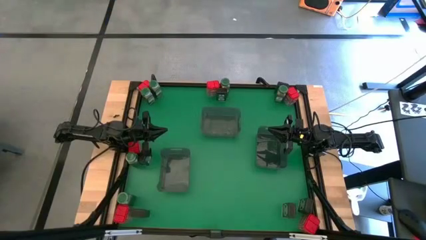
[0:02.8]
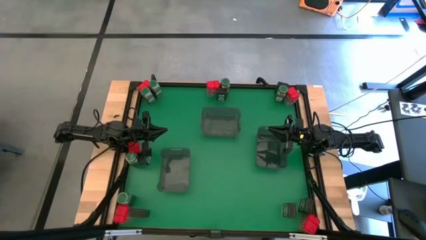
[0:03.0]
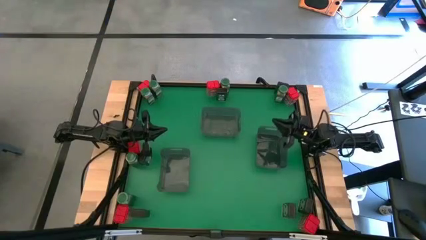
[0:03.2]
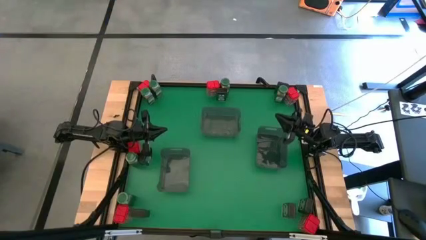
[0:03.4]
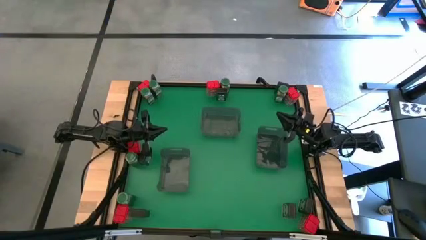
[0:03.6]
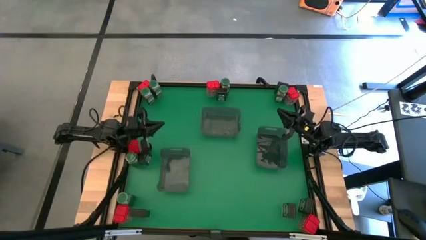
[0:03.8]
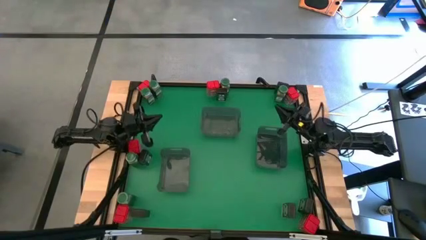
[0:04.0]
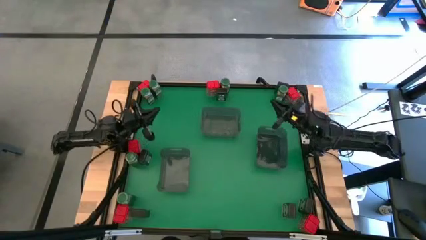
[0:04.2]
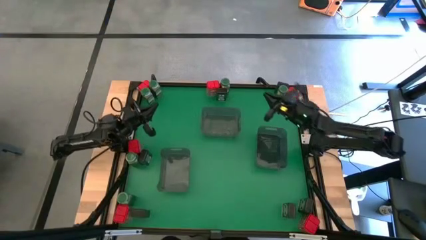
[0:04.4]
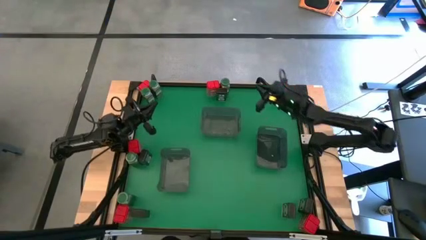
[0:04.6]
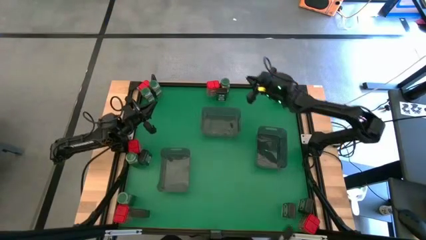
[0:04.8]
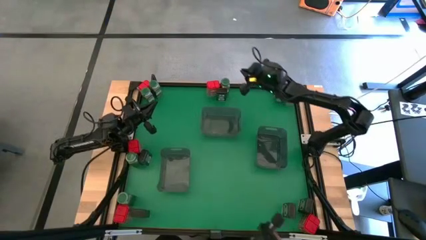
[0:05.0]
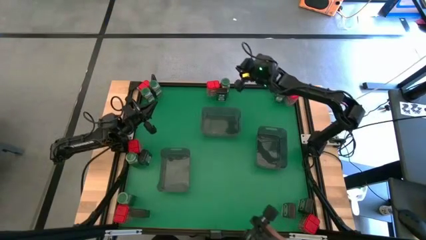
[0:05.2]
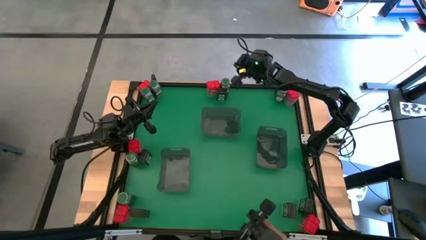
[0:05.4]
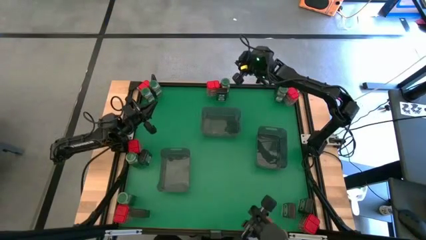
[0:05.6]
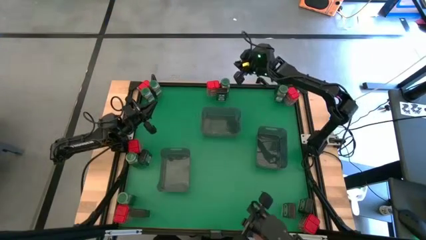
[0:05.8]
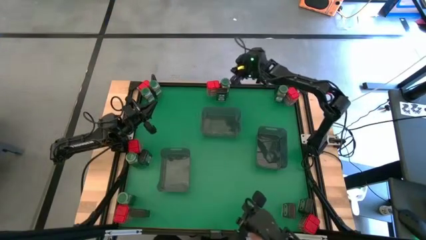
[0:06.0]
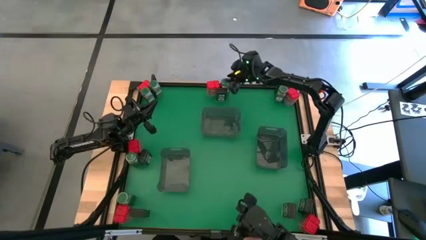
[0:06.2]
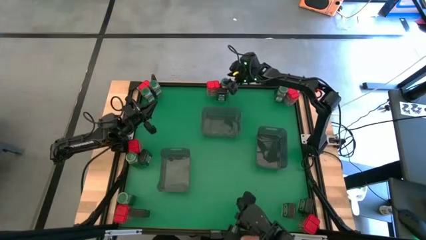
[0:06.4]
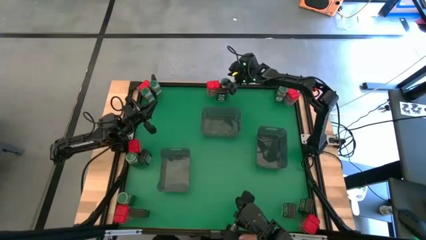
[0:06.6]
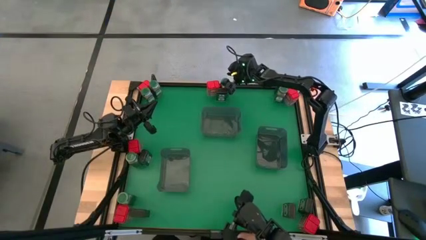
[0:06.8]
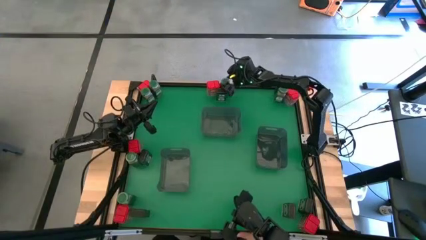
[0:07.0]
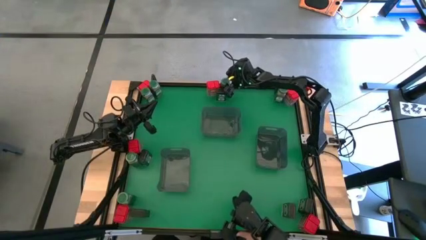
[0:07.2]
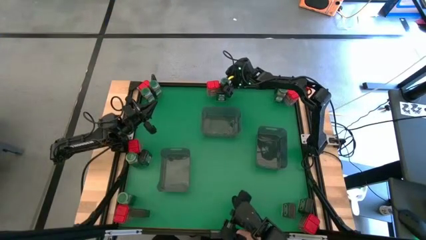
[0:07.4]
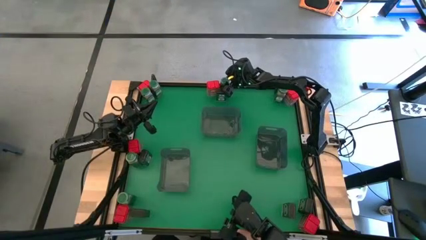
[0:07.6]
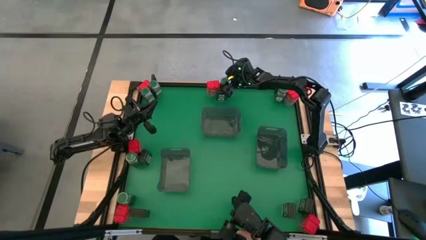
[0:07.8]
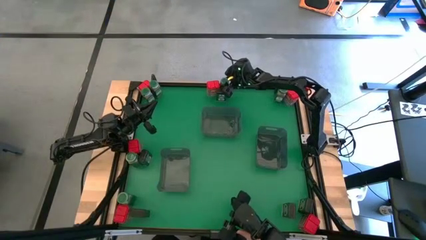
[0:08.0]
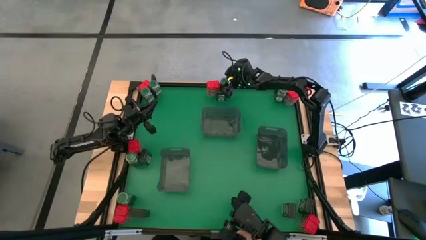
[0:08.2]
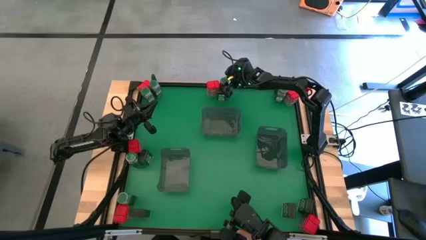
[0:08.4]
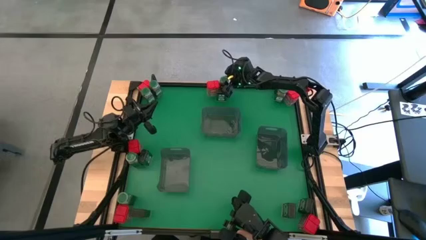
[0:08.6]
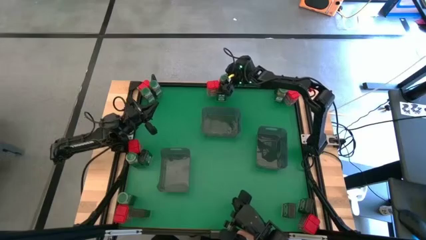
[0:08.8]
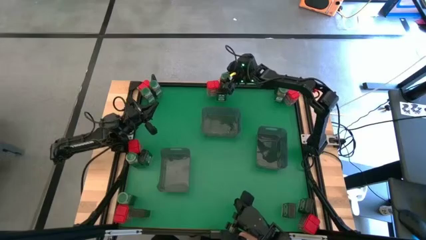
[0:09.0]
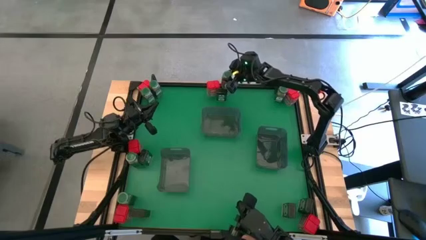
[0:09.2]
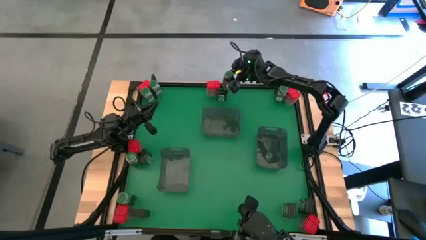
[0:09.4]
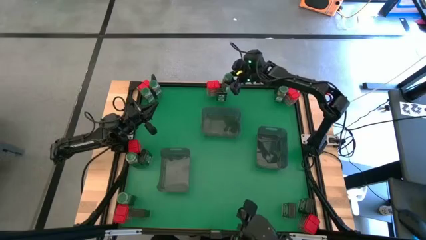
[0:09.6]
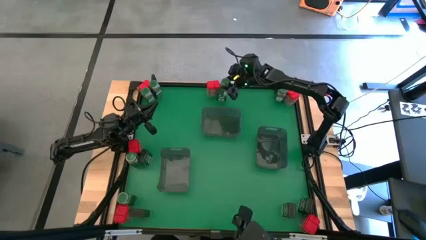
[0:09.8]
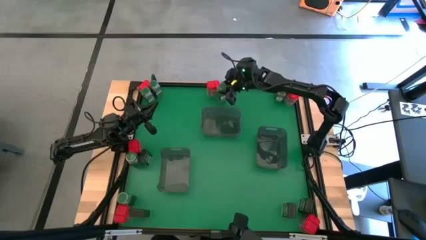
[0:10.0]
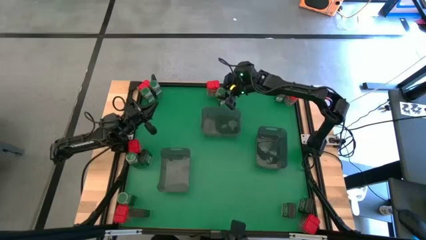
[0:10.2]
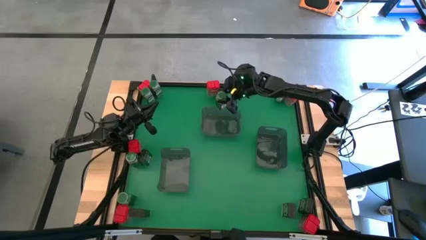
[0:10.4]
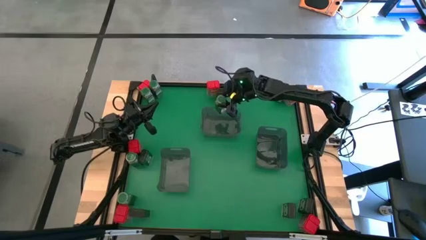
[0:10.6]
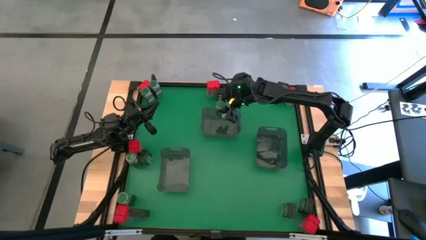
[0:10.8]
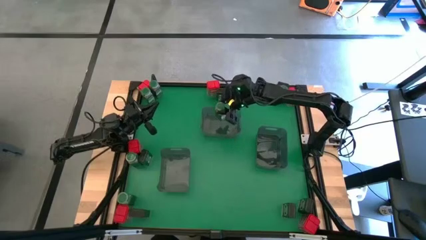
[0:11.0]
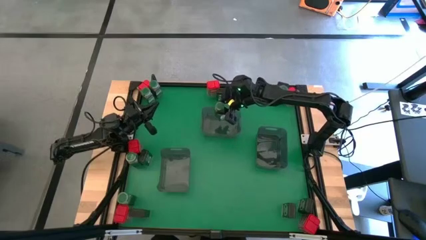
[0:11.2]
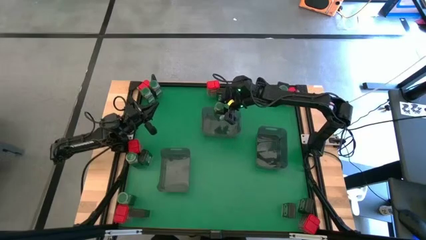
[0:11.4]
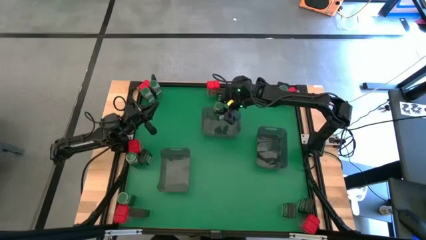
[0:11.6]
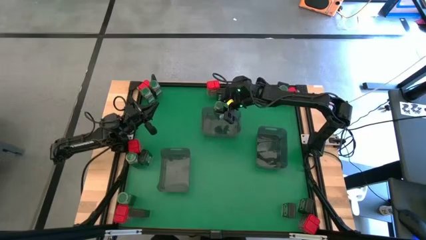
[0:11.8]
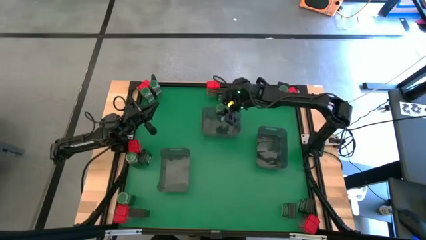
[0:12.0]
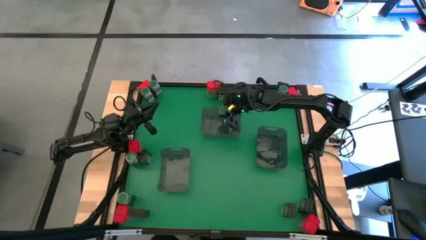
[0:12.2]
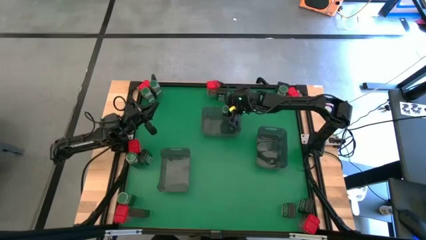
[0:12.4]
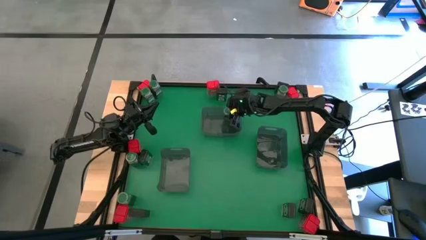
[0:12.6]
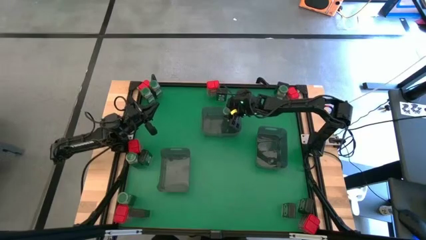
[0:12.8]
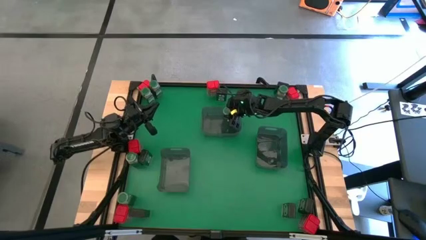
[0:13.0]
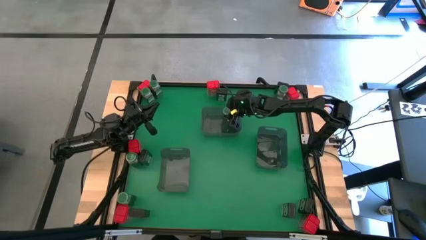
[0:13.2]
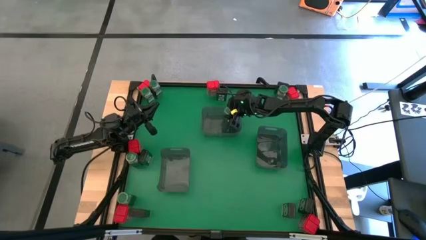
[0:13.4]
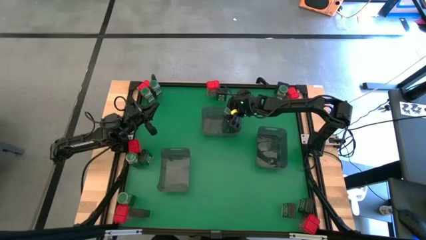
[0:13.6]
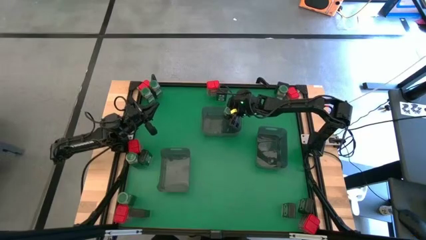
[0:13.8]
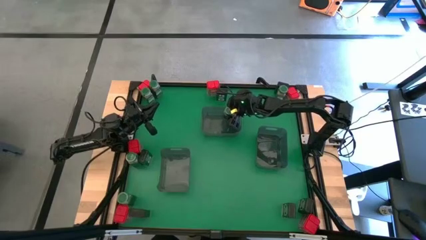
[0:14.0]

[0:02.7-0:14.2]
Task: Sort spices by type
Put the green seasoning bottle into the top black bin

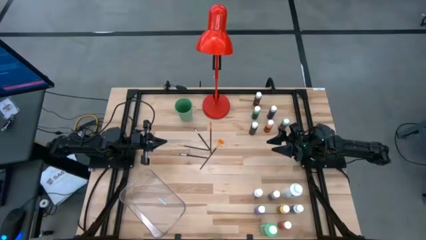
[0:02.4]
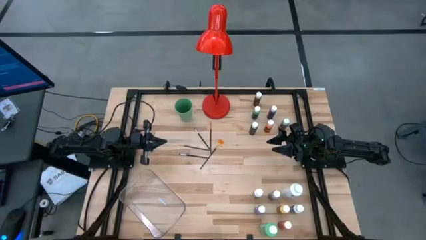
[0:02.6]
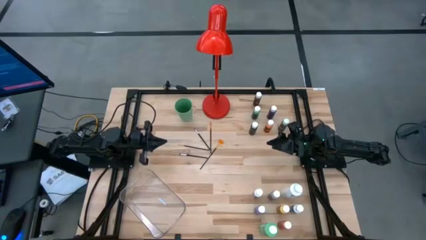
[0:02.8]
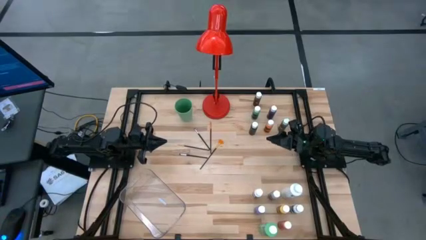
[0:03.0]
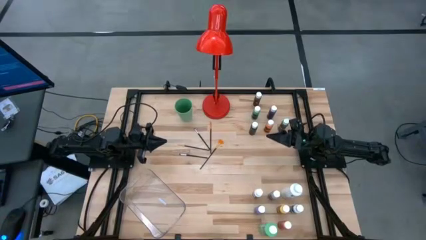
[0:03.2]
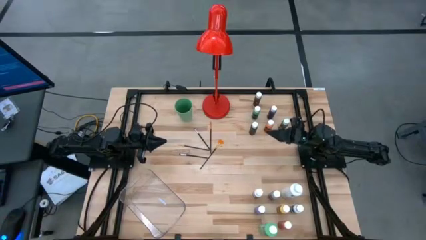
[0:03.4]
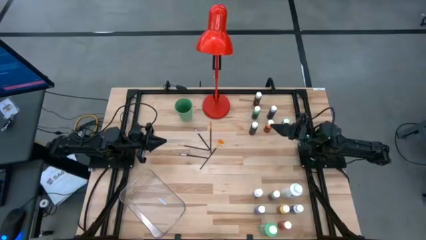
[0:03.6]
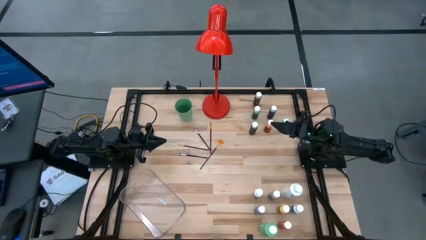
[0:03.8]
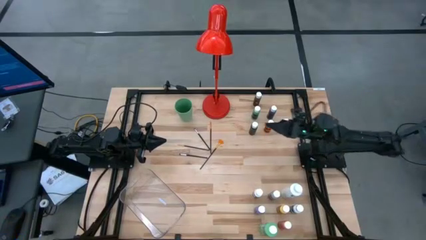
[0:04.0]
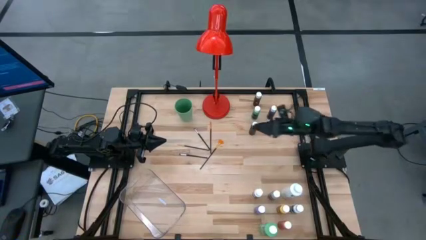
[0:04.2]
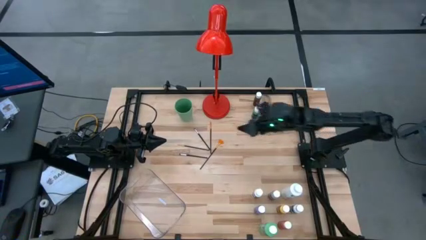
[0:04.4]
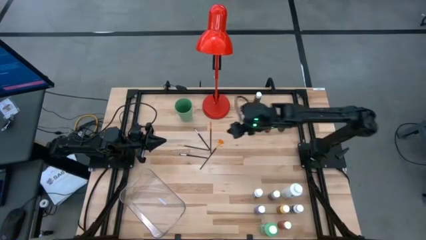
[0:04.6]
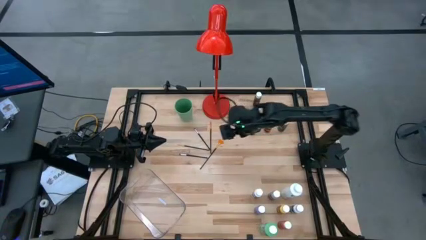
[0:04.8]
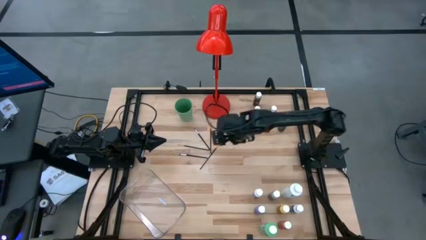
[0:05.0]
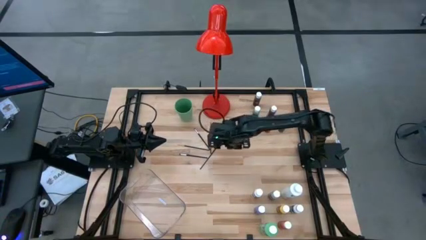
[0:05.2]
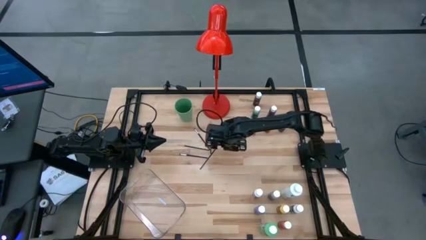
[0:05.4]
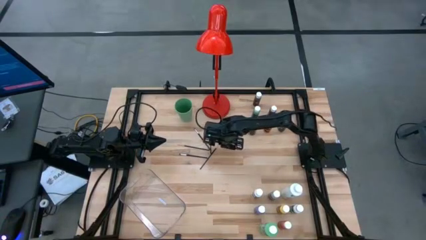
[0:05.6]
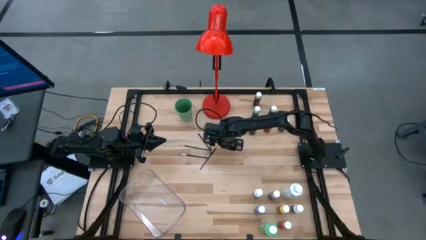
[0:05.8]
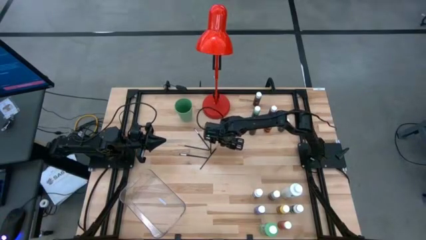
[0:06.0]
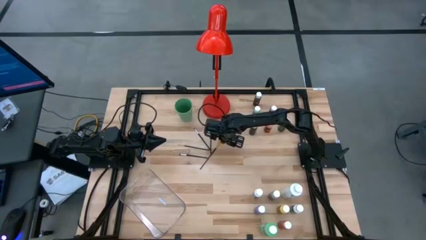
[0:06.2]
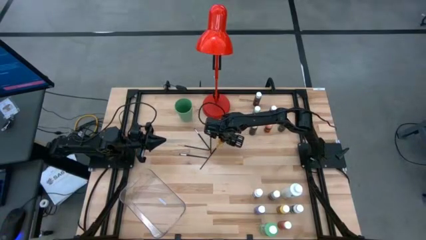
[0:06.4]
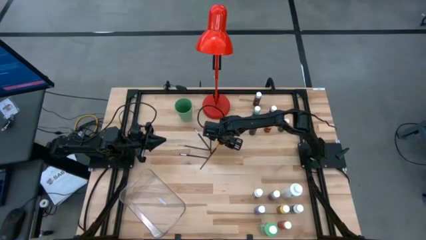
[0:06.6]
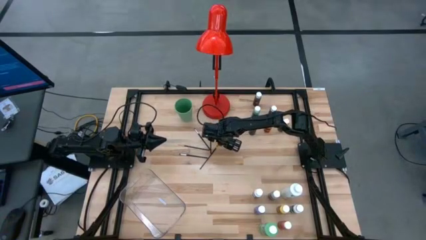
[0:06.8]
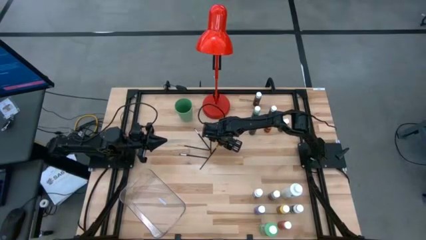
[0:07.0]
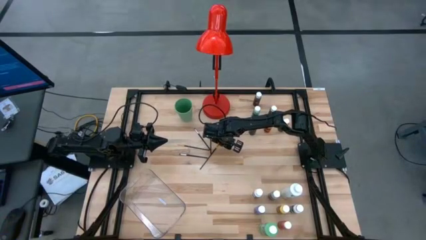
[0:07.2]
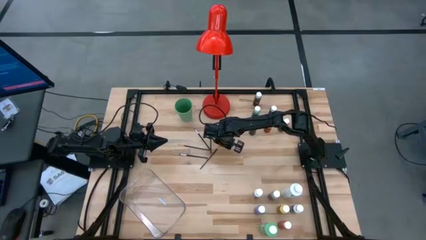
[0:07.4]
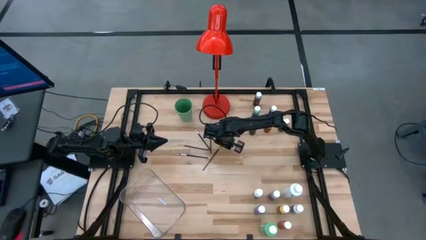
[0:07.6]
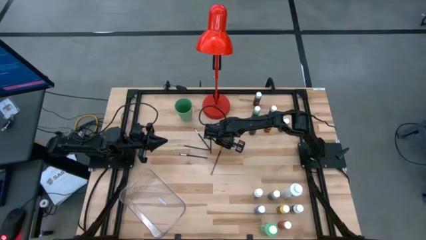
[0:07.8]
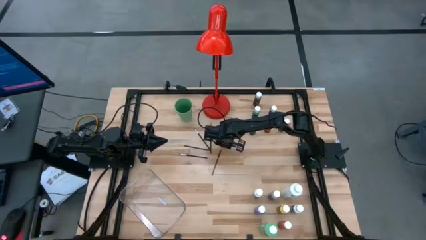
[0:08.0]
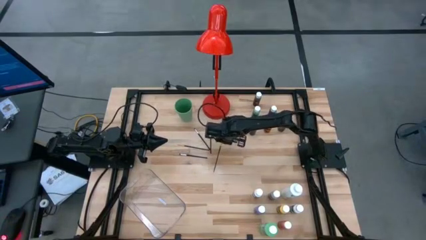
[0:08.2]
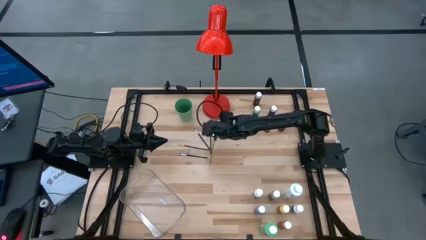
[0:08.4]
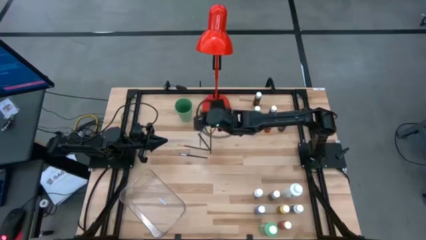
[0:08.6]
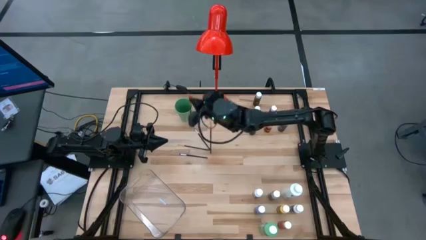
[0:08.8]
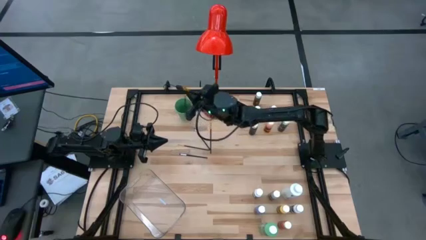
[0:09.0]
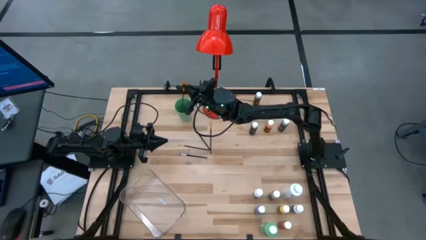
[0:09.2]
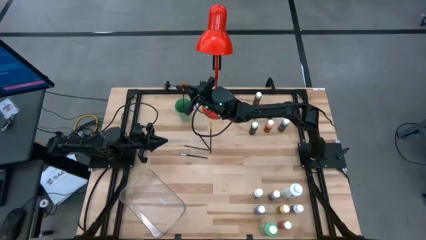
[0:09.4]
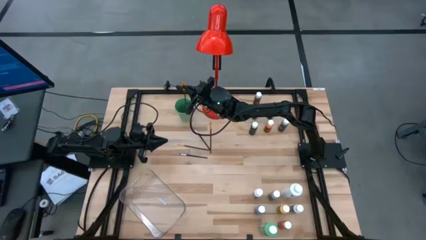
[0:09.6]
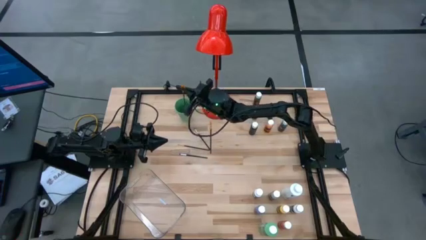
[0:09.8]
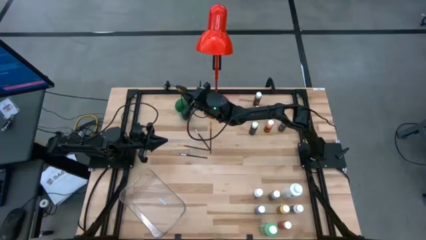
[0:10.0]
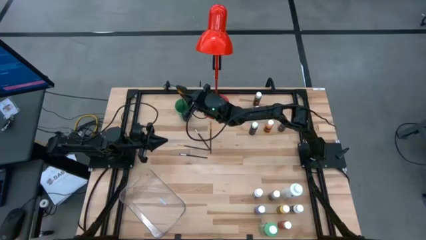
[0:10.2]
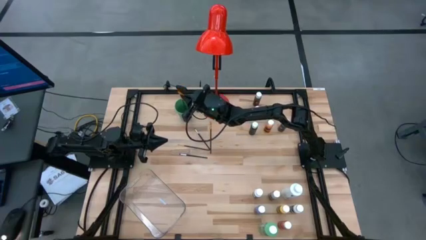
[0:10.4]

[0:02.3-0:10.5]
Task: Pick & Place Paint Supplies
Put the orange paint brush into the green cup
